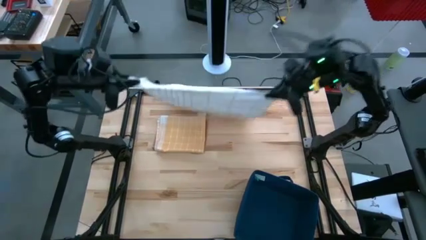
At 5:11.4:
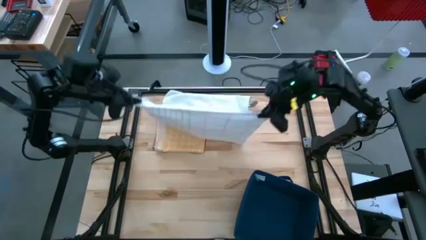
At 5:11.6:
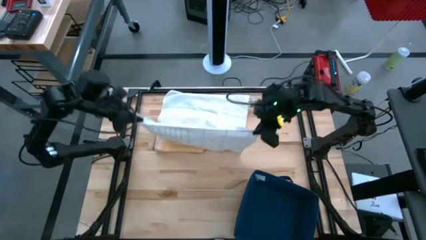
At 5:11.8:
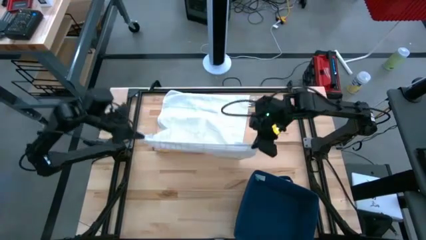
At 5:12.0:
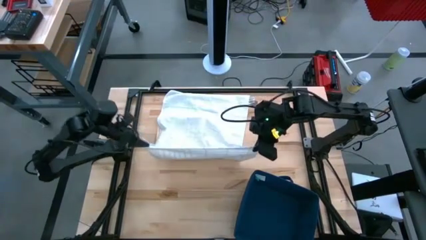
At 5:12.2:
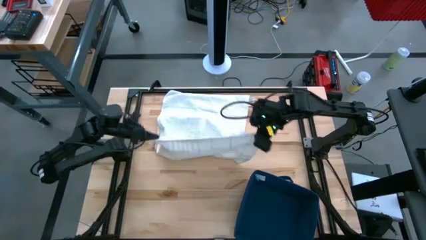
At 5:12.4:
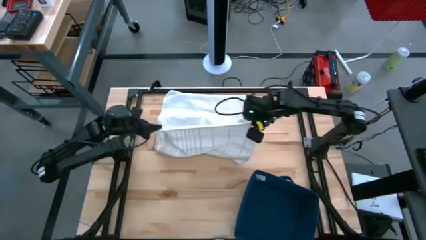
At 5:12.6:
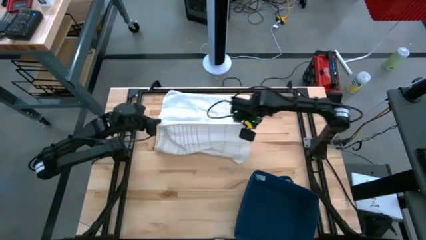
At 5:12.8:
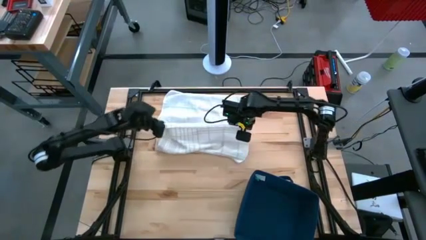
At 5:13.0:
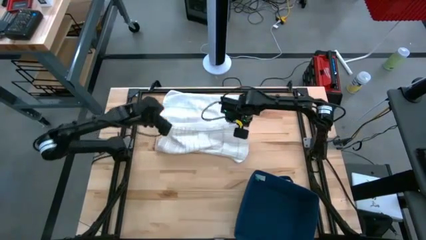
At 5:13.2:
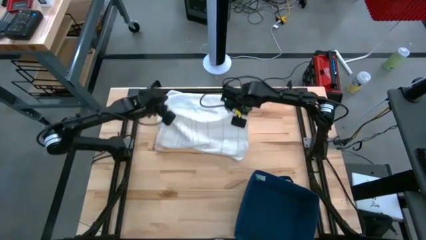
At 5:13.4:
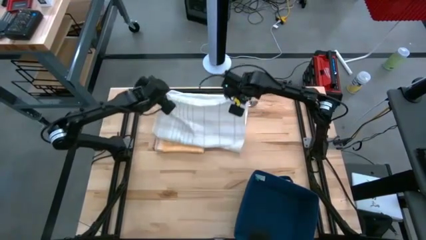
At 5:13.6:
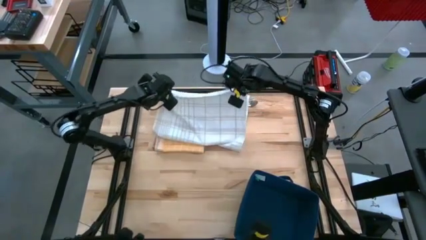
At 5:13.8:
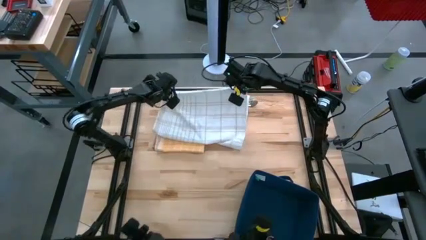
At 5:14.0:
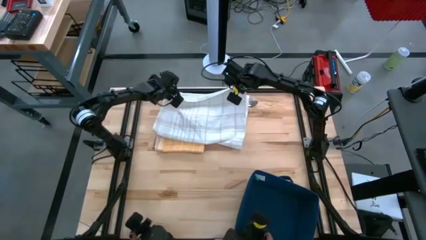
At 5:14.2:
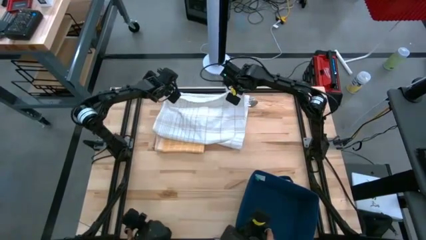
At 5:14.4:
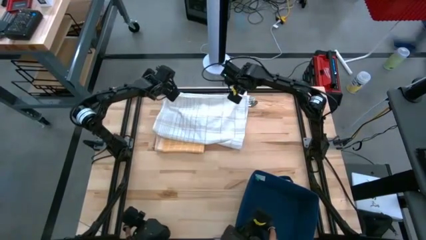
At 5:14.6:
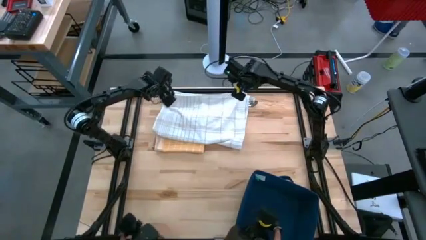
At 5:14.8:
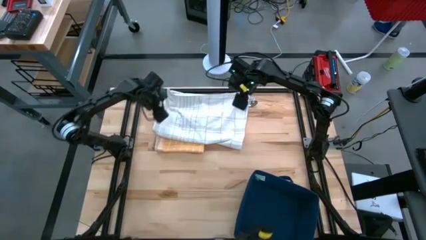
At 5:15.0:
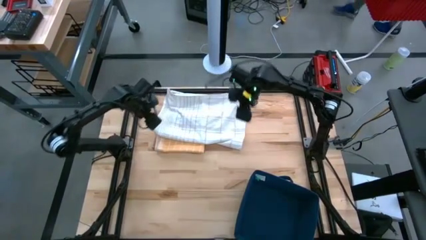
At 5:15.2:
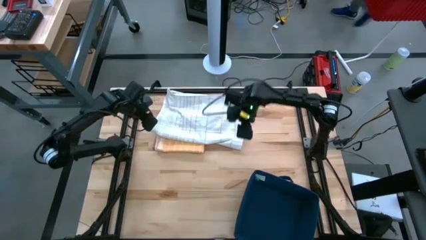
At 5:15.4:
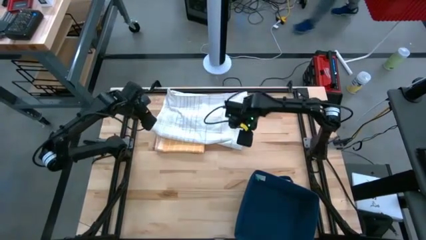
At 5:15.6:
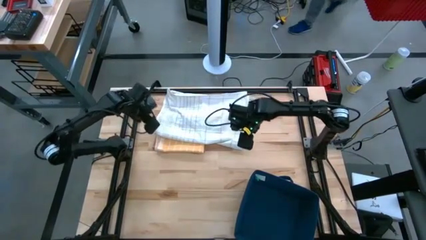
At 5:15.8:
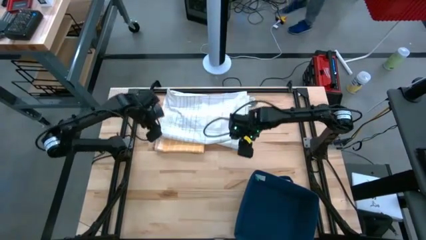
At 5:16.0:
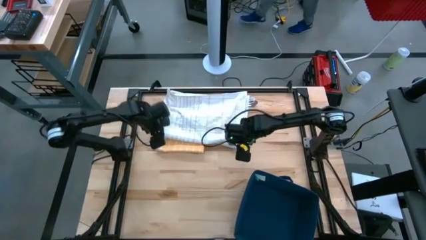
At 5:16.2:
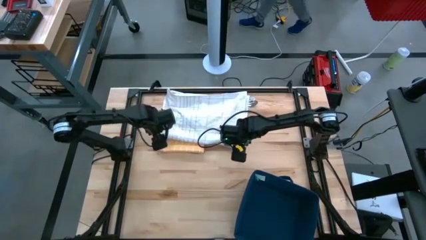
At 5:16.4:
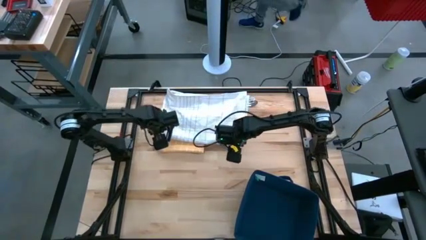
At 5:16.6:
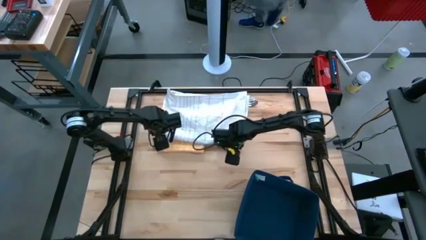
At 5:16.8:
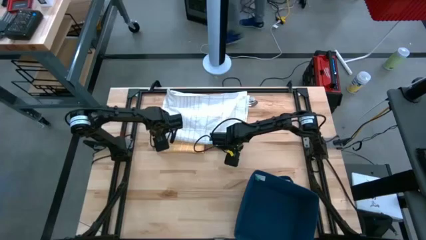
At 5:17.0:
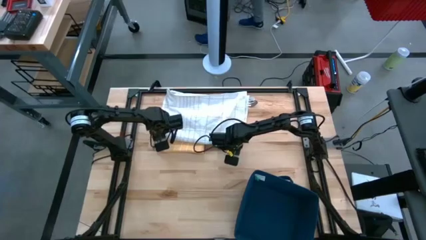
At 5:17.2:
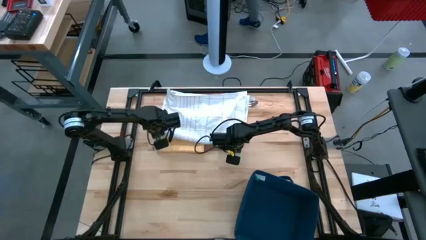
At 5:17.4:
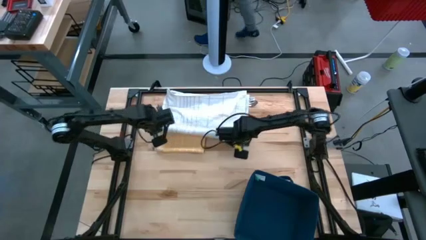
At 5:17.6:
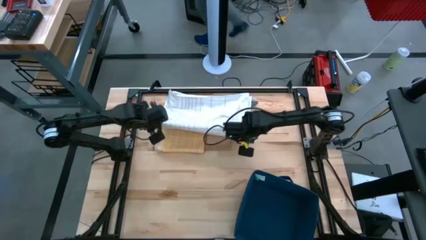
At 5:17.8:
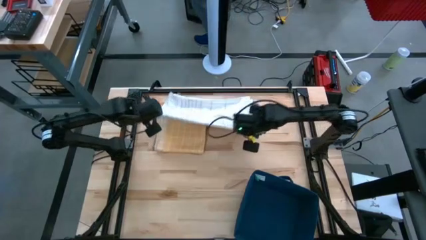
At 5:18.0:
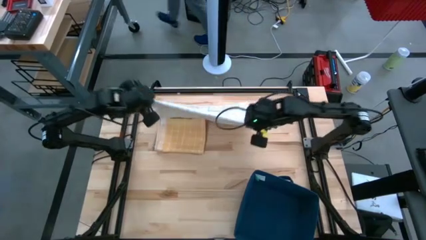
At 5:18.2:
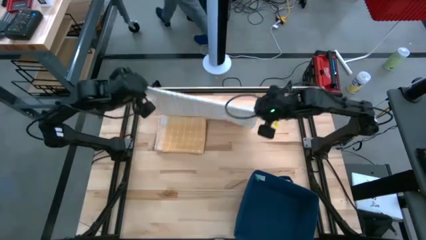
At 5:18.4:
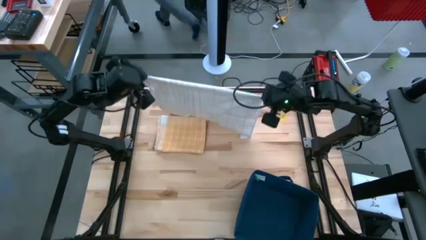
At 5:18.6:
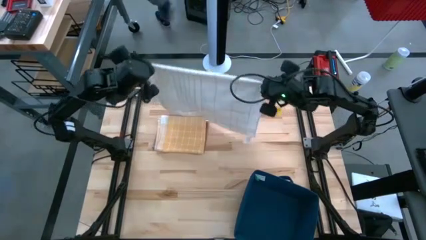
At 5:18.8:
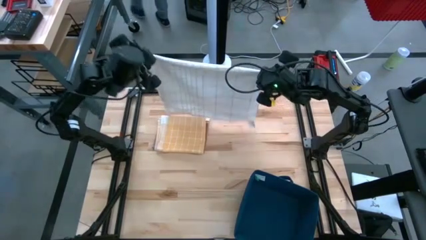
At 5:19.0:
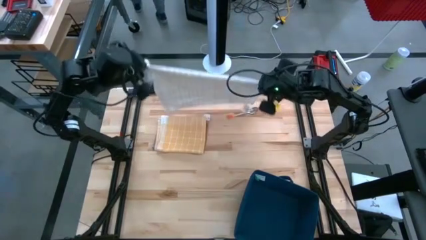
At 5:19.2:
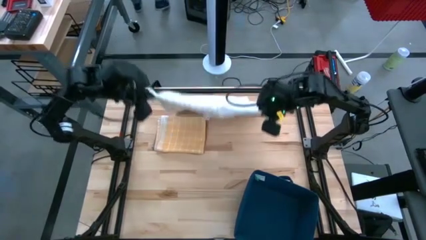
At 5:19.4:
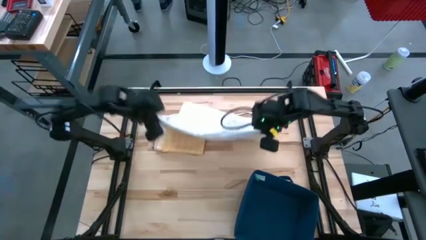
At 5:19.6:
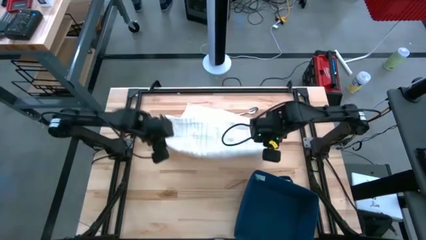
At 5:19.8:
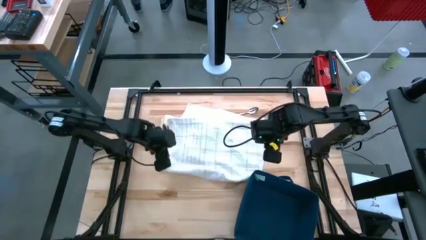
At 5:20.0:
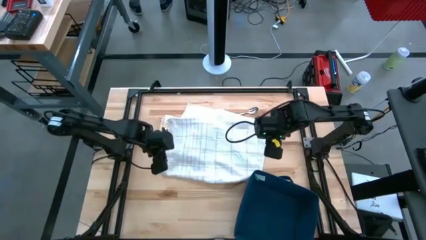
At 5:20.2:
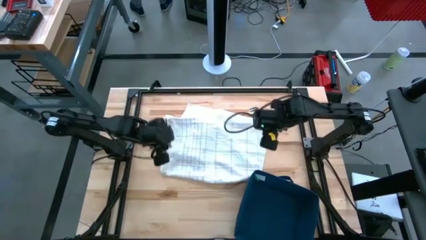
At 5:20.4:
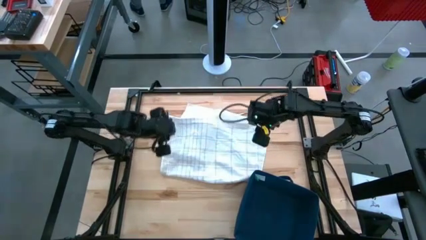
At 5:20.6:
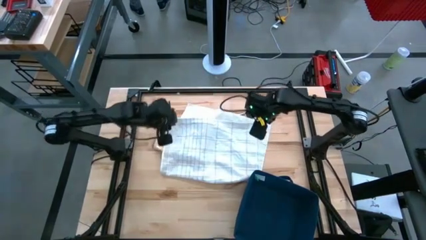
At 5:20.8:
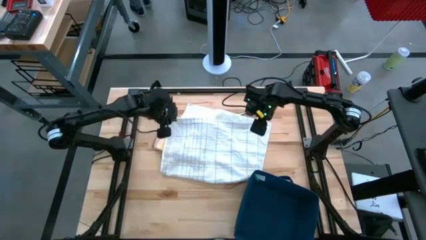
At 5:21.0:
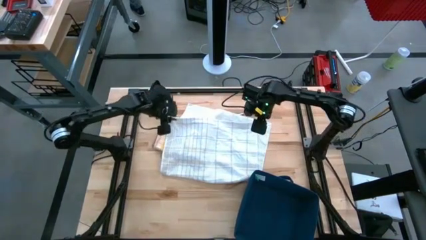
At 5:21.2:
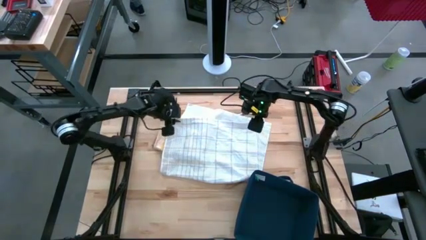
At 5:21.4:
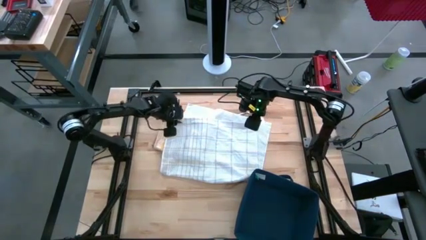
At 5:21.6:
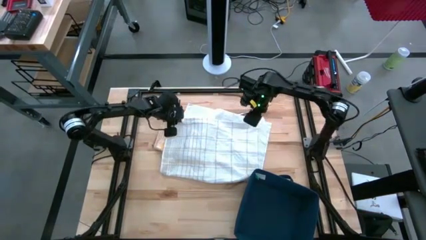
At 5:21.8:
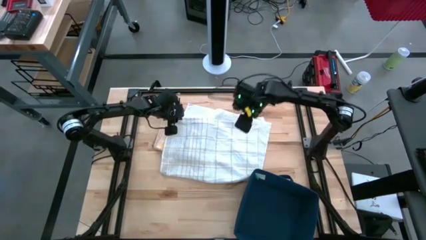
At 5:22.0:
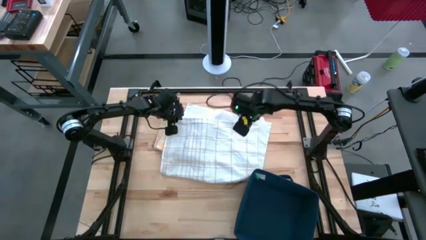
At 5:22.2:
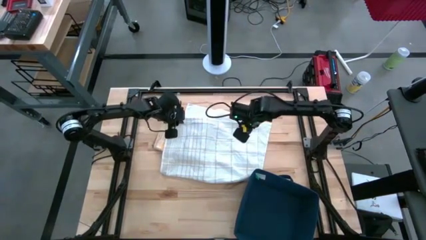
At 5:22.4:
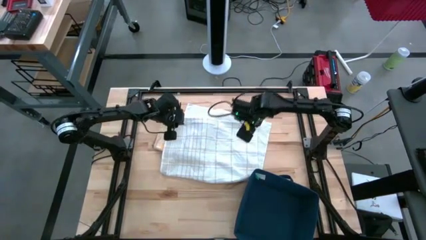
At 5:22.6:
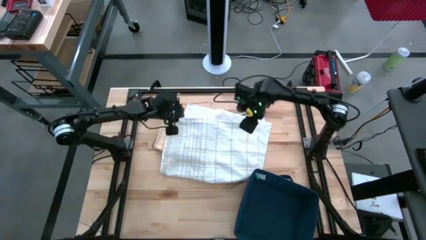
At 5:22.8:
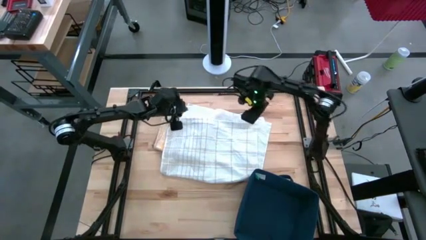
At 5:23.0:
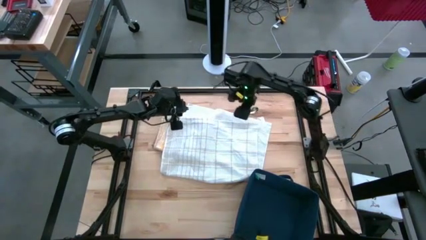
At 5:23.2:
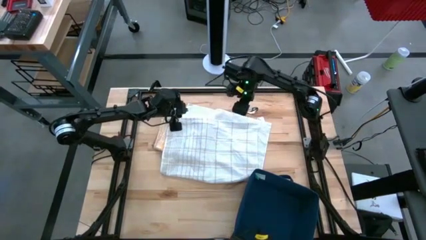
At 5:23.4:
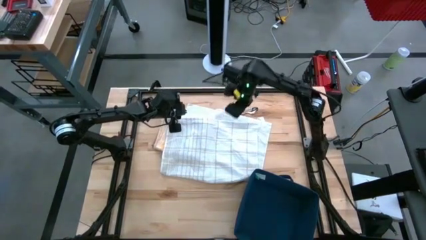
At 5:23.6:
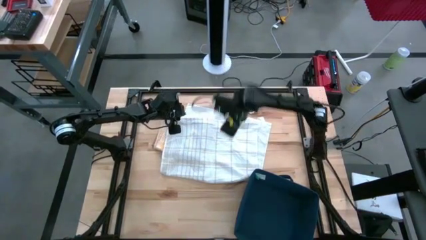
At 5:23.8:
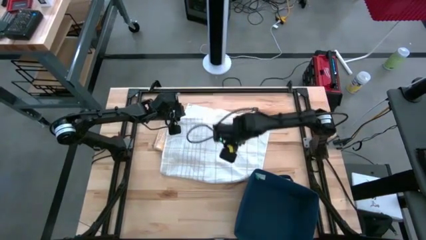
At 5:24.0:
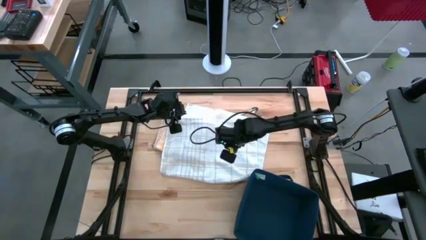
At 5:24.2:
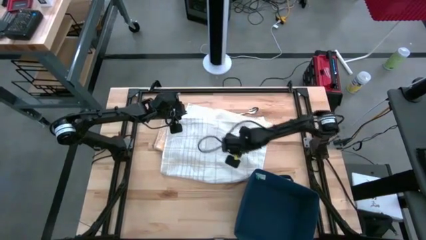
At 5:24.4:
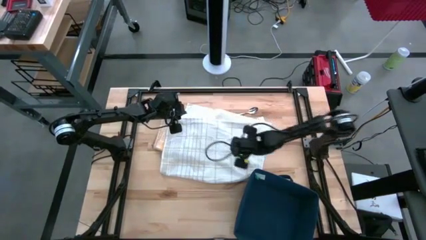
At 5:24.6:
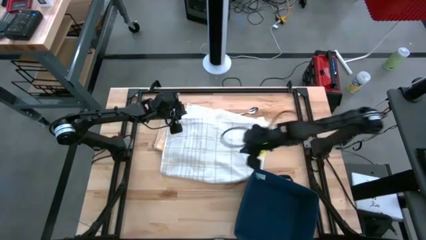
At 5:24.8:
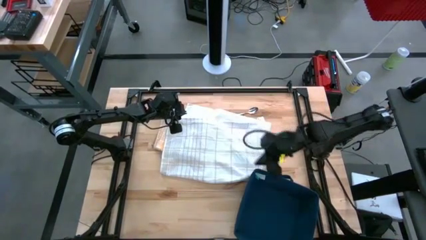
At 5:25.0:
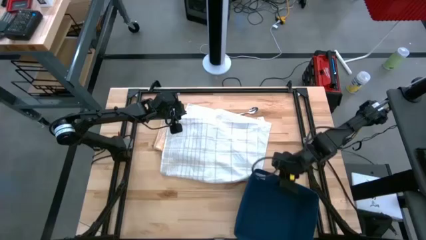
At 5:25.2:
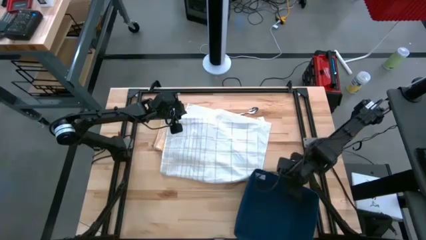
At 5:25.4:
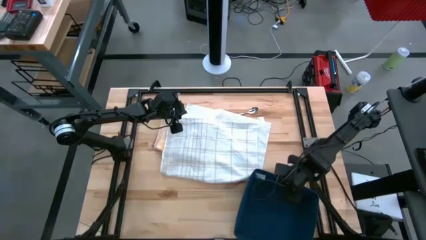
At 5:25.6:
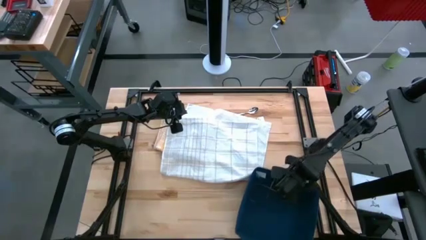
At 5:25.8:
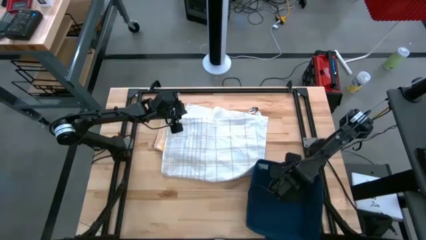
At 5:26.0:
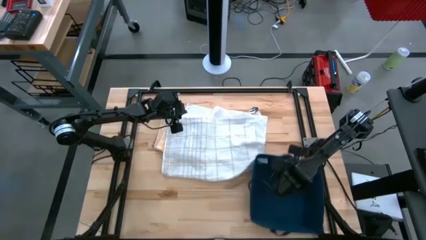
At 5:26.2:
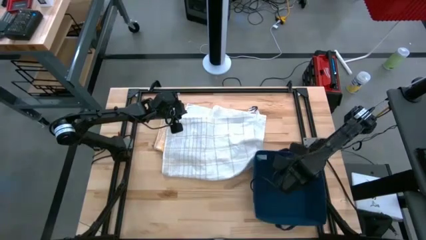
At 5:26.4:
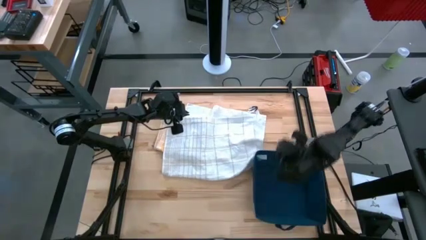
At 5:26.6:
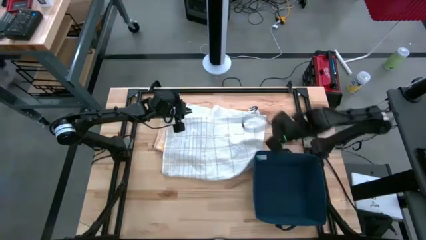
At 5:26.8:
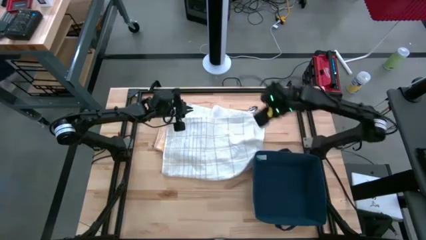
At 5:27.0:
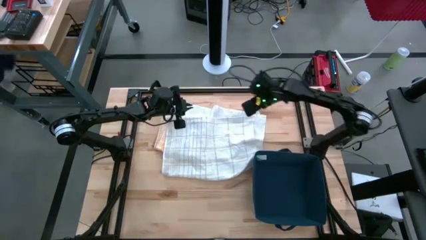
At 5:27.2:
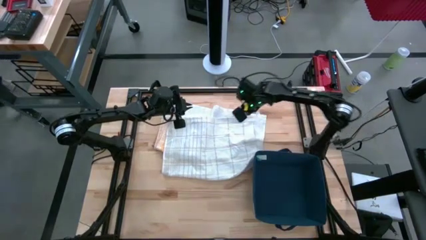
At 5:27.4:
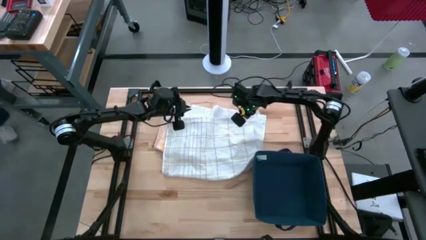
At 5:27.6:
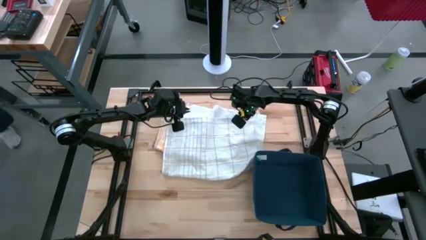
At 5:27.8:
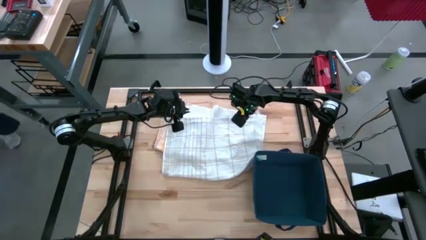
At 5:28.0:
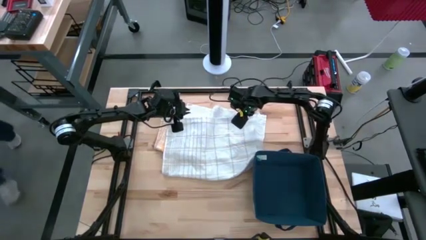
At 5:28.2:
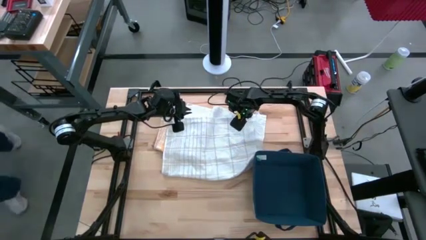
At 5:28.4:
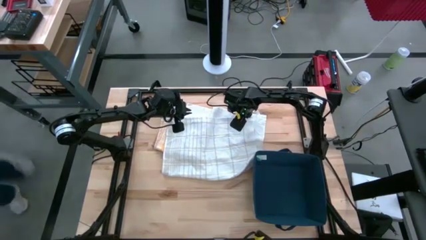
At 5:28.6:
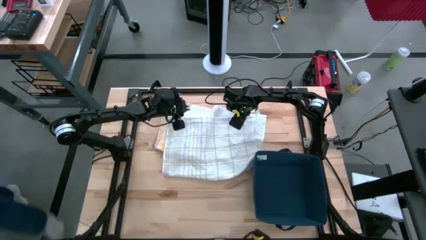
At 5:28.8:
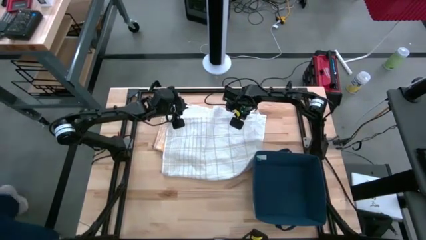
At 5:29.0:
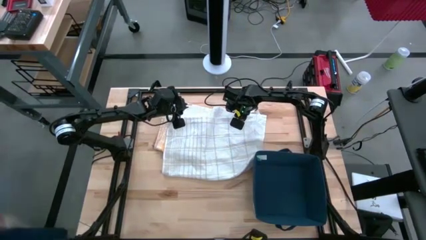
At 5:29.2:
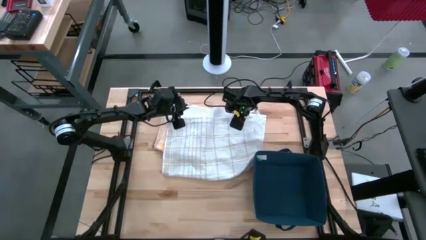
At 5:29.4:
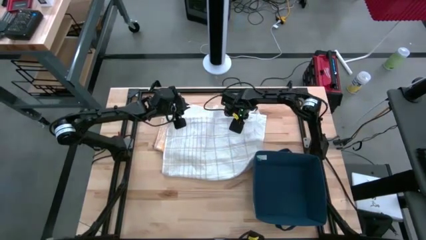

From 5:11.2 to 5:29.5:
Task: Fold towel
Fold the white towel
